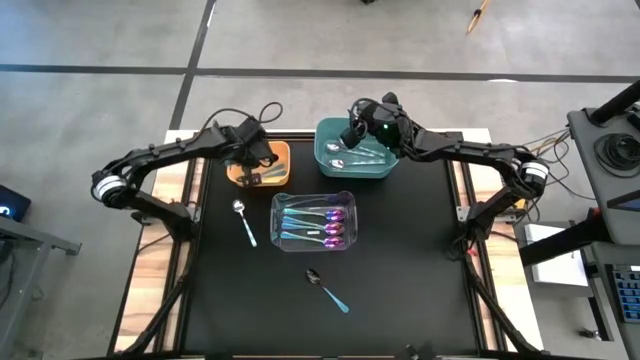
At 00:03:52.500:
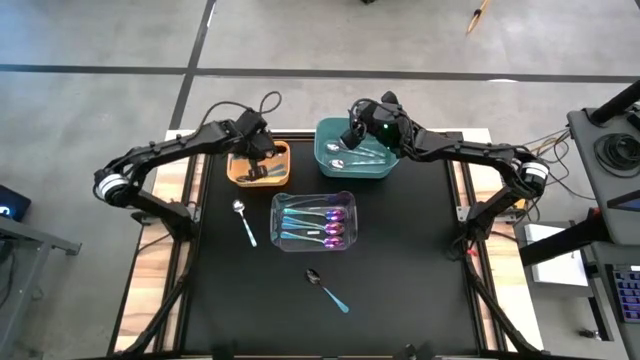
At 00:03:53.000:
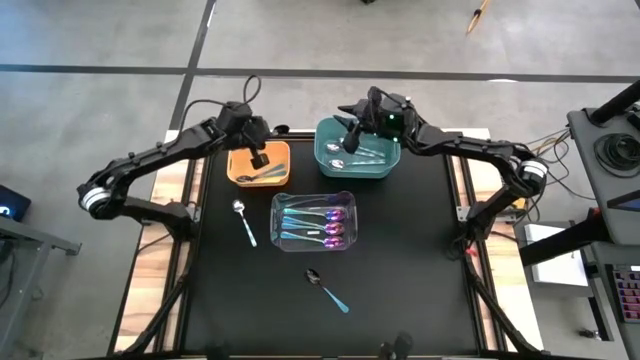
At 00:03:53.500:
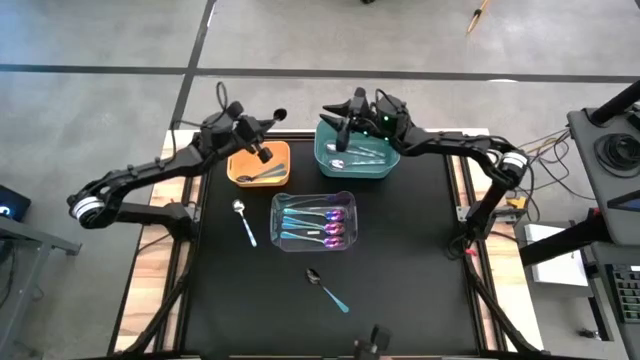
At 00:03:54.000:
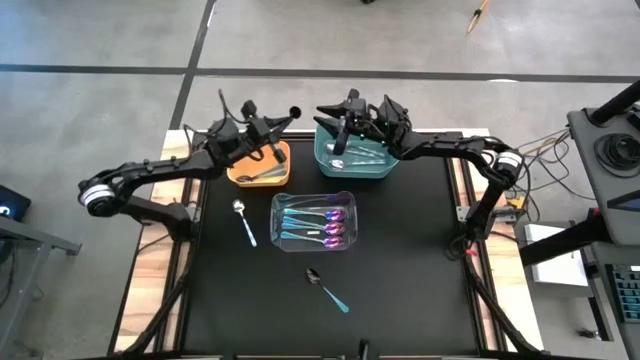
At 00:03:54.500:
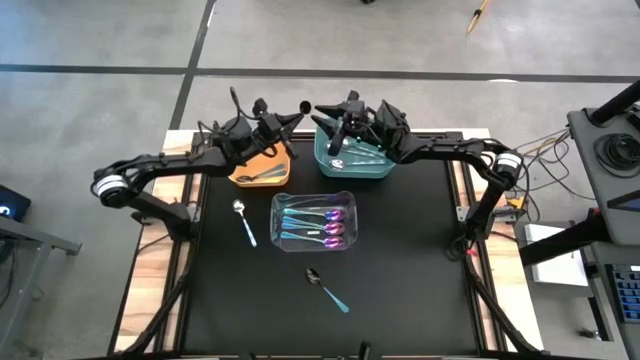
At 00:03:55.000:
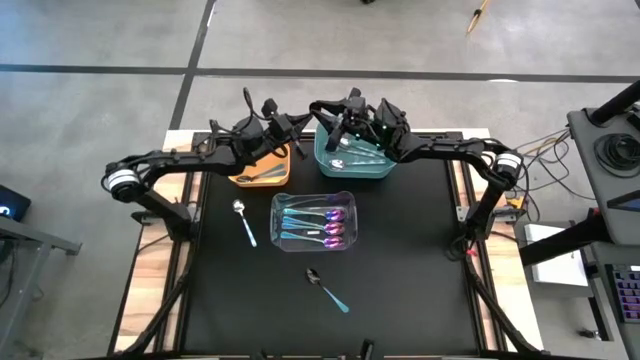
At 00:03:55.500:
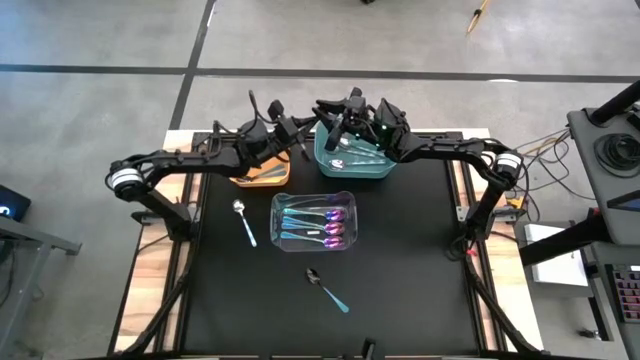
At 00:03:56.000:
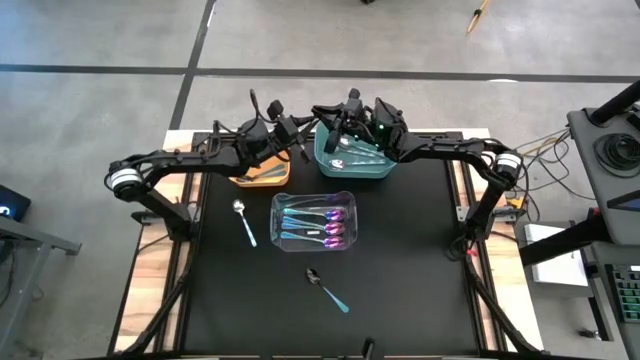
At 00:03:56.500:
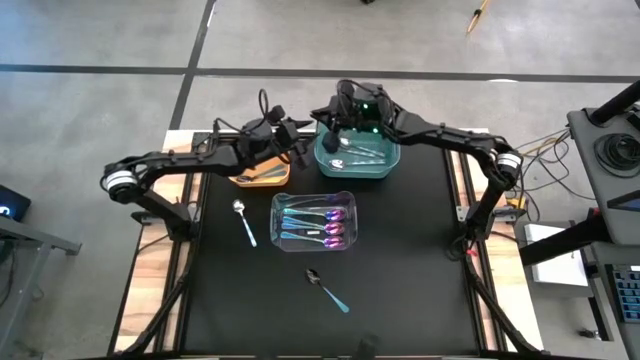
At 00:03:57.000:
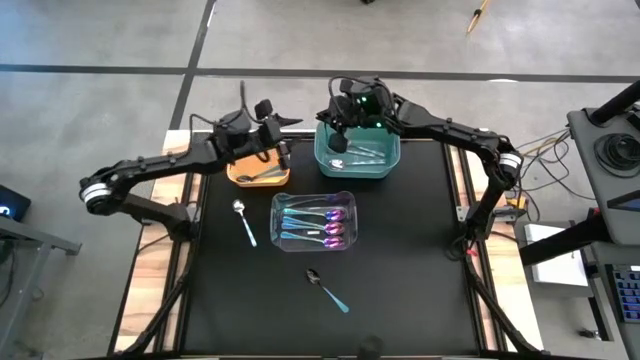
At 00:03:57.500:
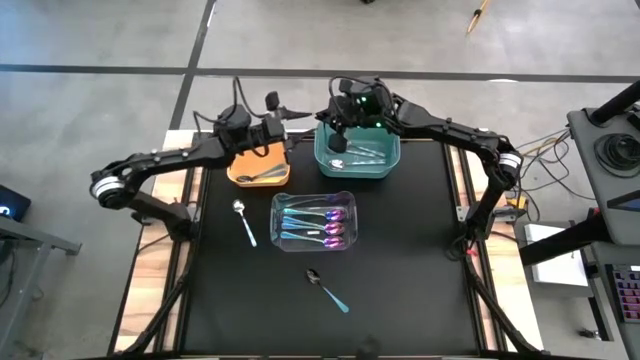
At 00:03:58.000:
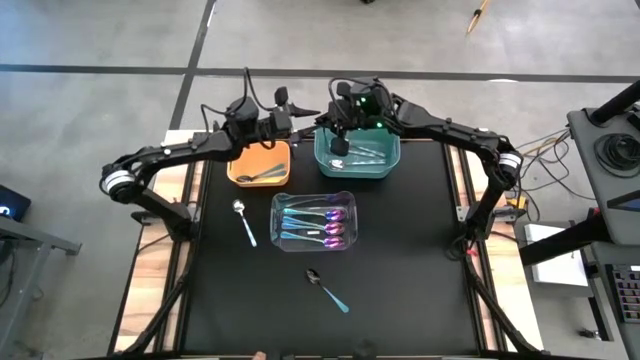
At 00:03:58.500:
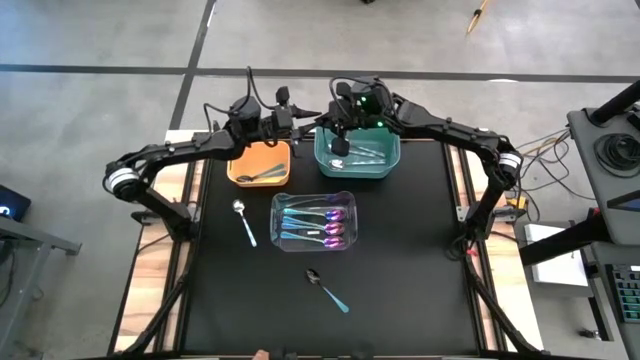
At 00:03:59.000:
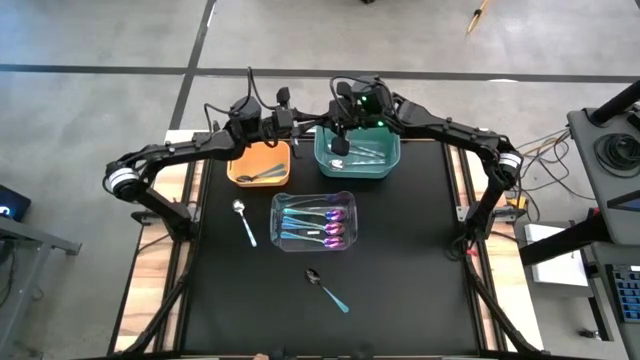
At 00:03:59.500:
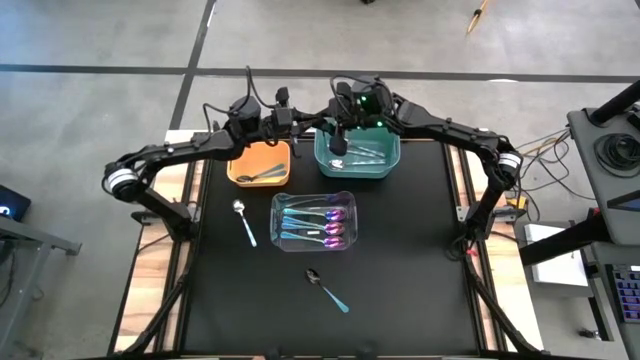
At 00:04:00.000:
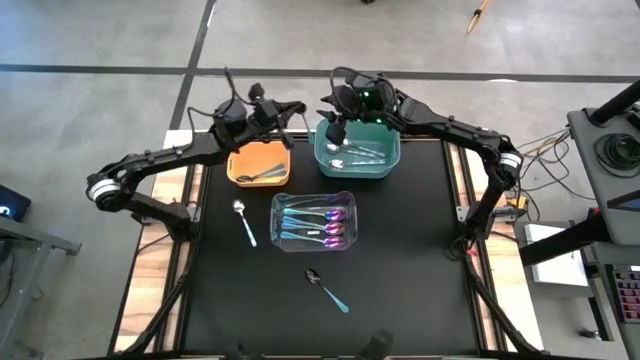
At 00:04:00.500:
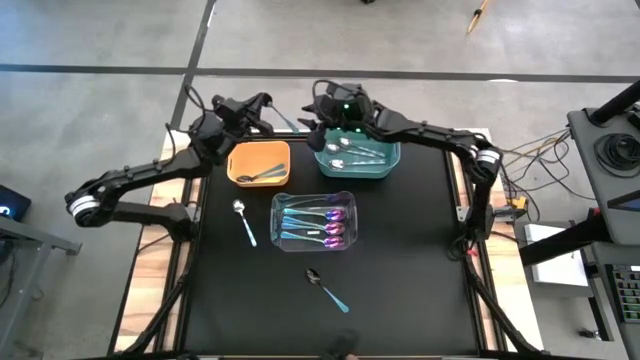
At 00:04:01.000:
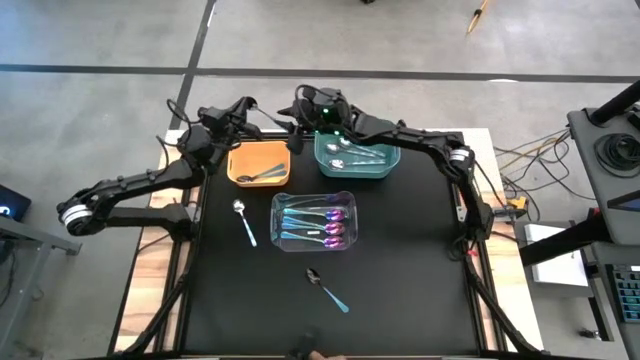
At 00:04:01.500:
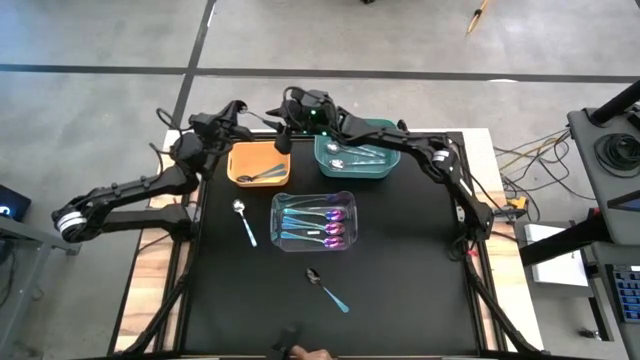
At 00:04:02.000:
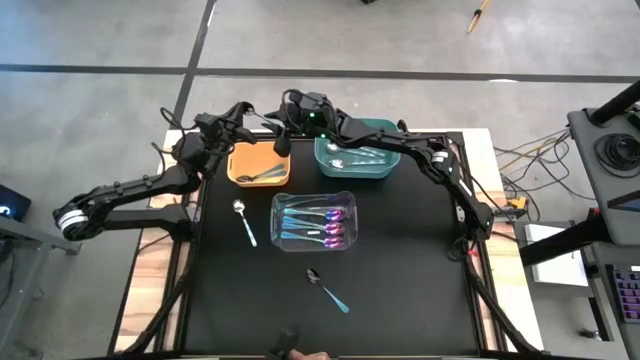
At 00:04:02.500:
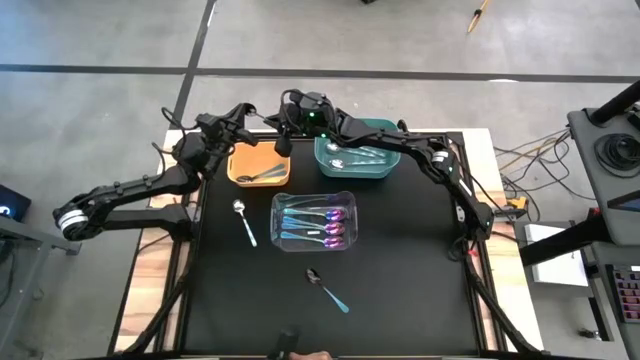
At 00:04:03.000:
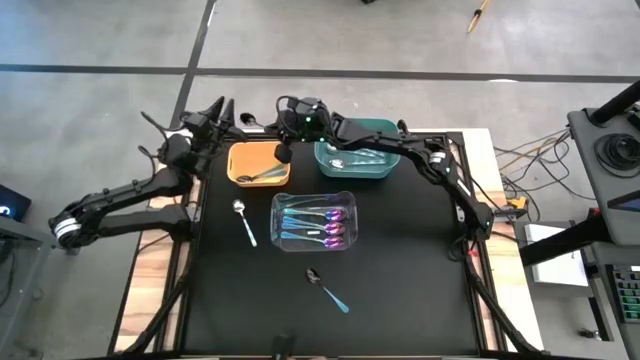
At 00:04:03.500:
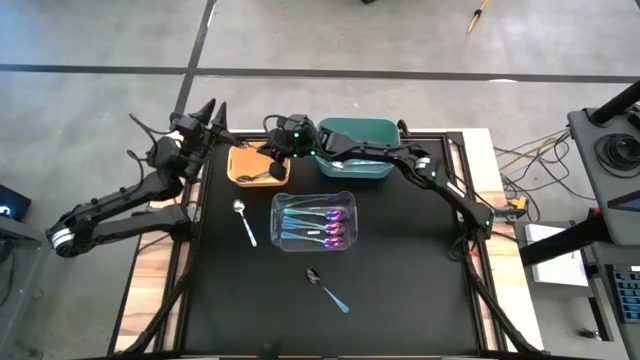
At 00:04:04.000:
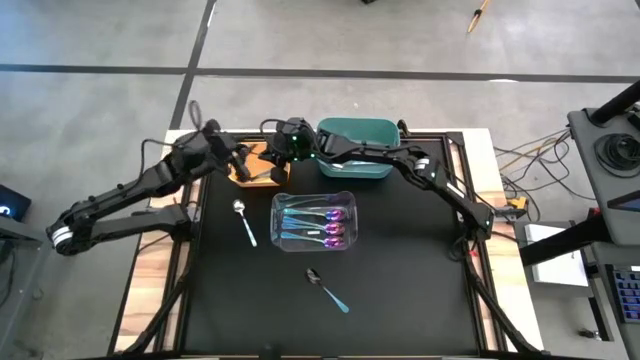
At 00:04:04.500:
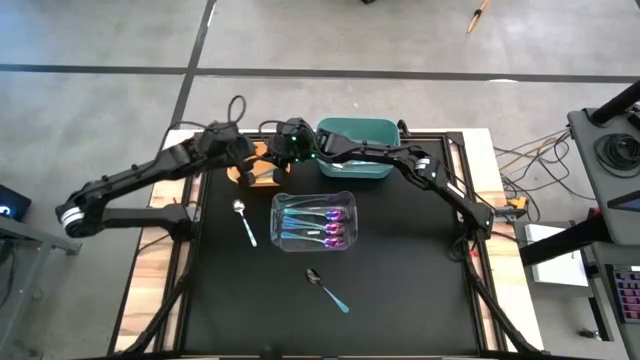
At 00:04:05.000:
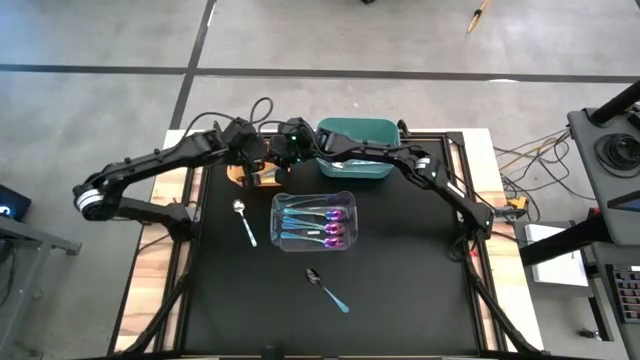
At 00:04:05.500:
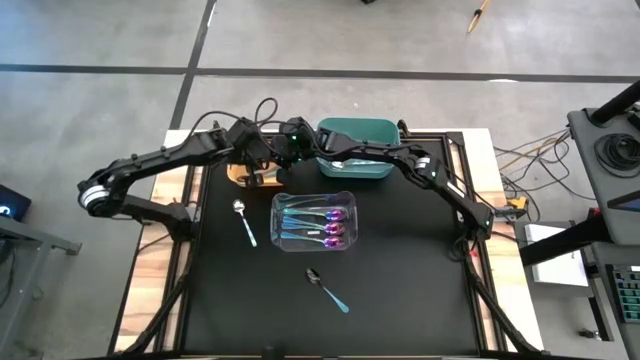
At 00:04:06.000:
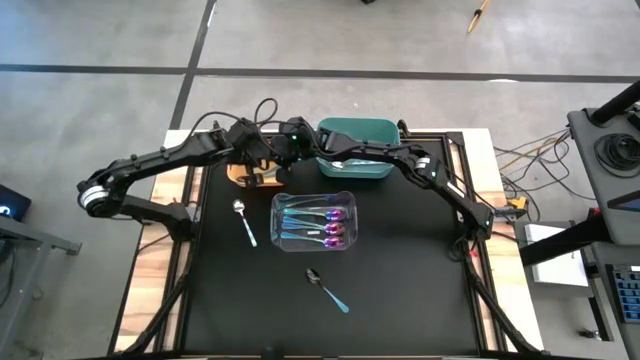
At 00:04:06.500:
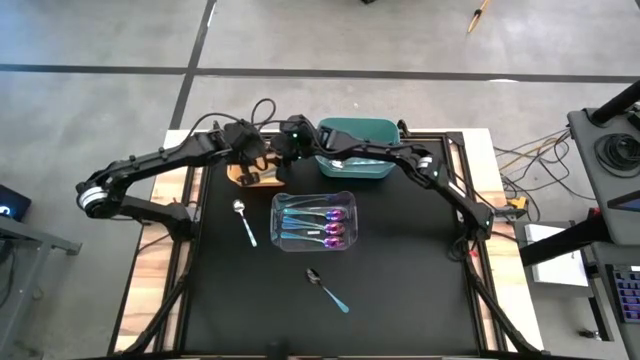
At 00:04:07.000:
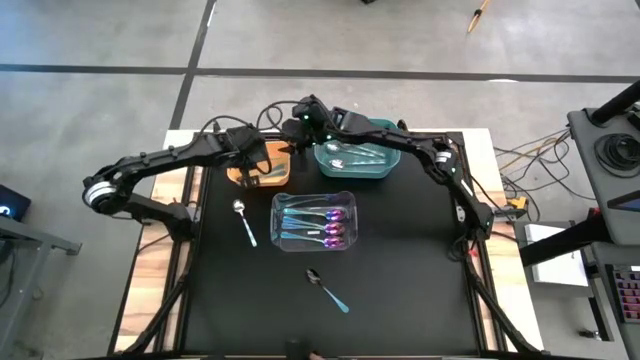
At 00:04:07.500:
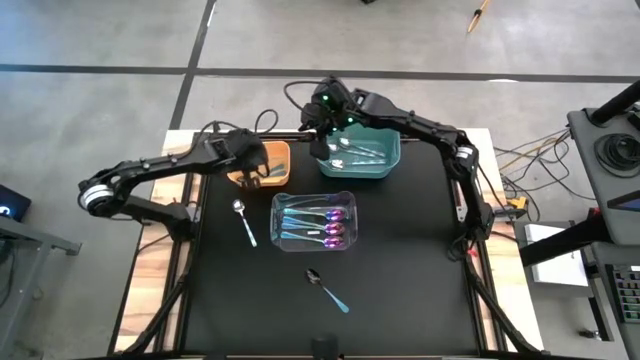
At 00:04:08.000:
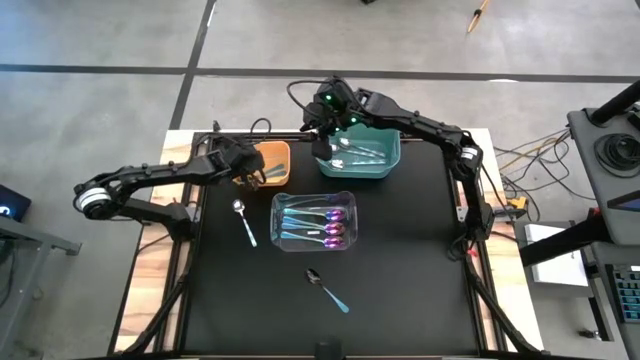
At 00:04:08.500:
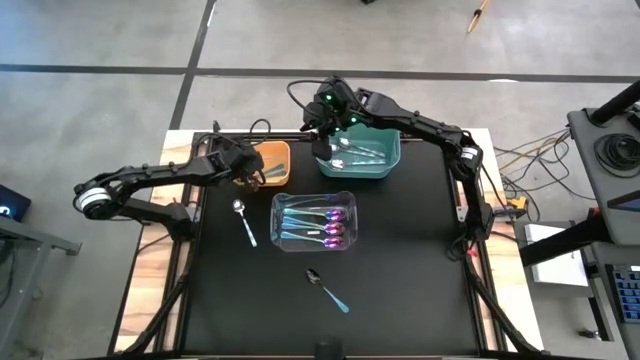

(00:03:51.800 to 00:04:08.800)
Task: Sort silverware by color (type)
Put the blue spoon into the yellow bin

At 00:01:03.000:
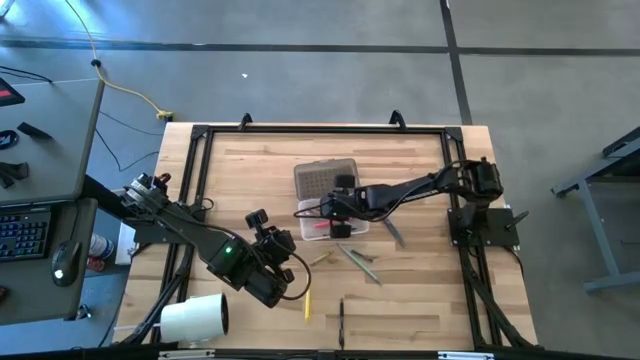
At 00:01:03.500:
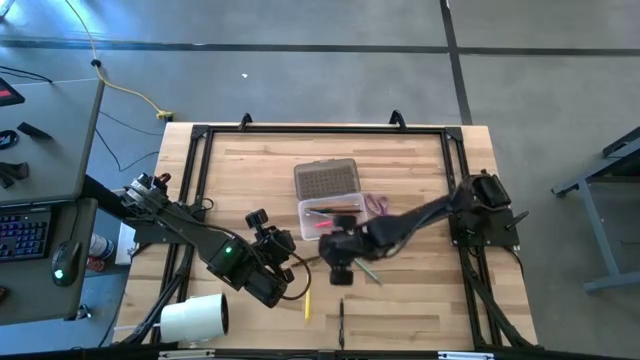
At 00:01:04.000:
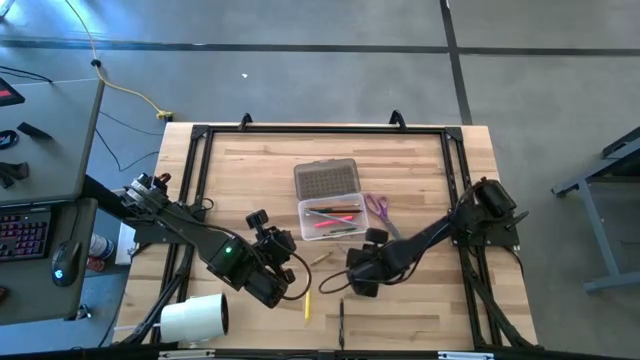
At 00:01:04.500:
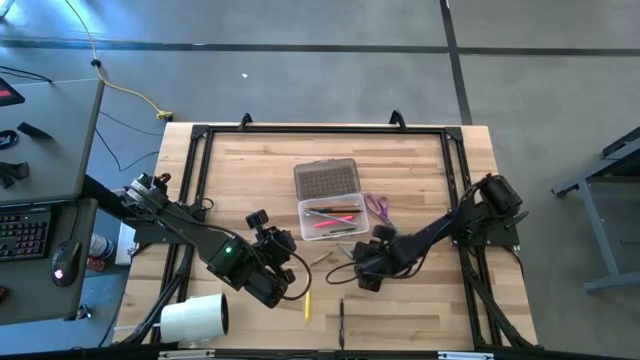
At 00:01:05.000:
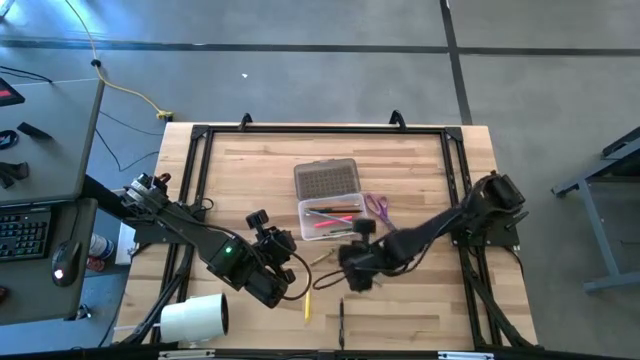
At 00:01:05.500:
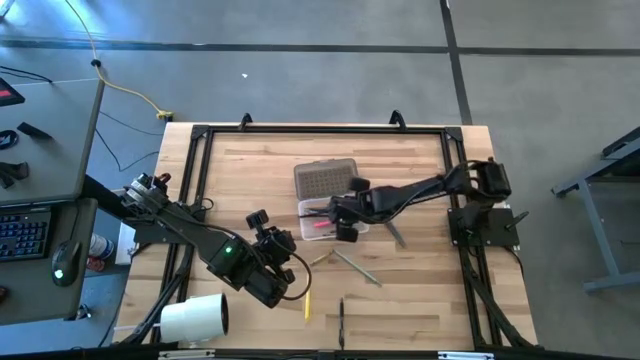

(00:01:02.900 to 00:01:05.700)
Task: Pick & place school supplies into a supply box
Put the green crayon into the black supply box

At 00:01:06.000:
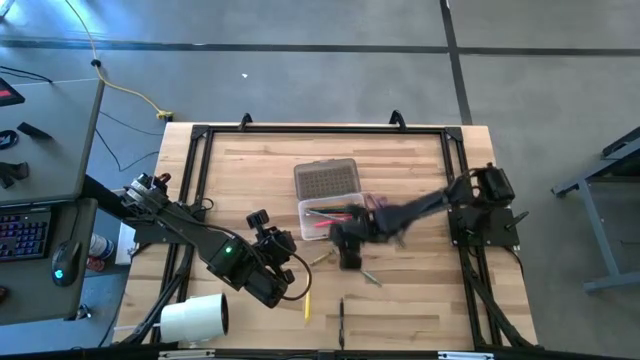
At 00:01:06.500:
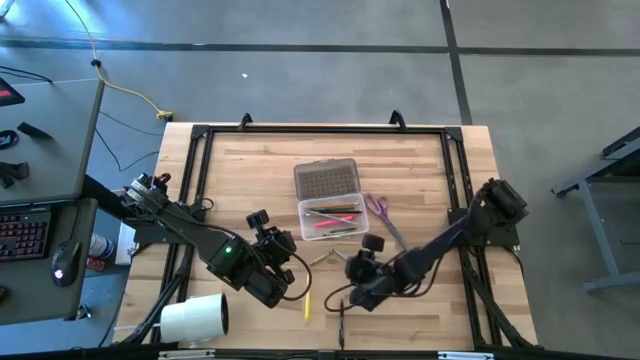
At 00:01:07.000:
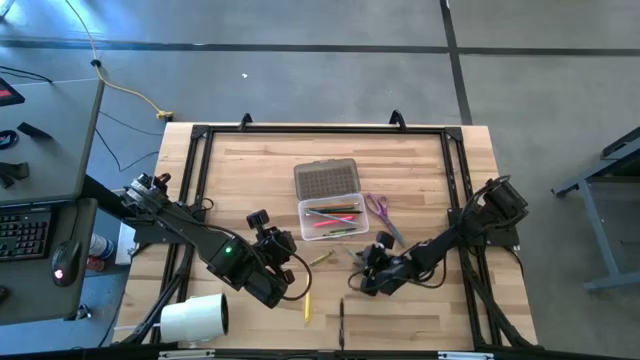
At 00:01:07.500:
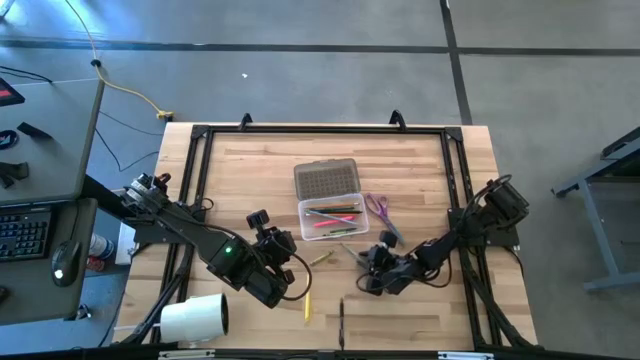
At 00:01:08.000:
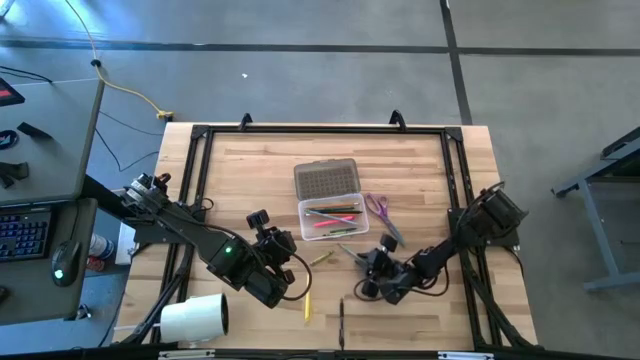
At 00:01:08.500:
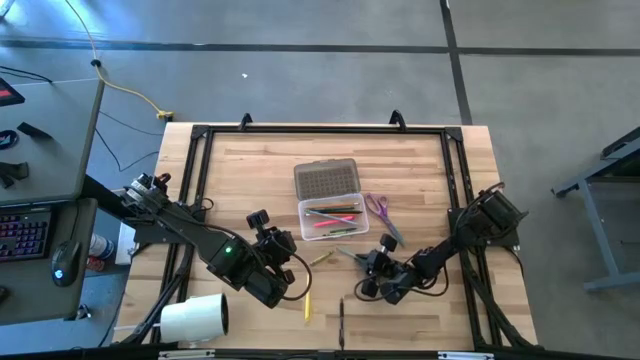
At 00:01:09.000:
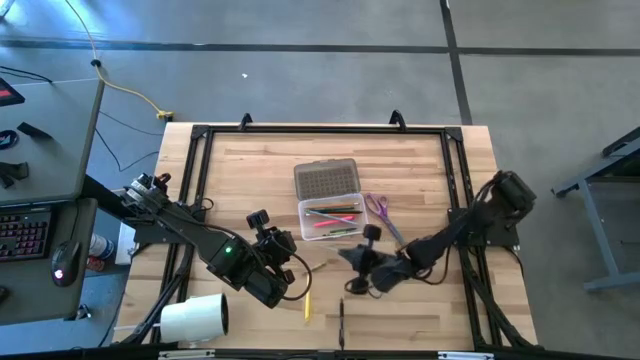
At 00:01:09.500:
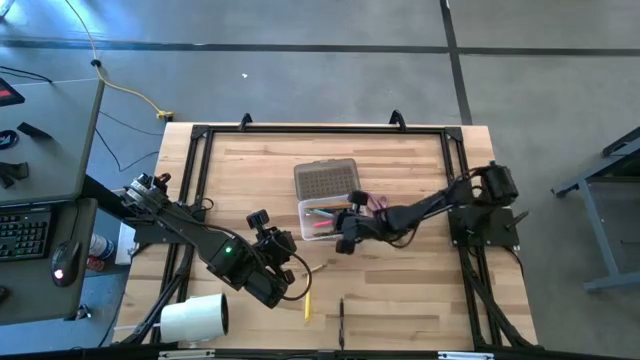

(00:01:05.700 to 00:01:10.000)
Put the blue pencil into the black supply box
